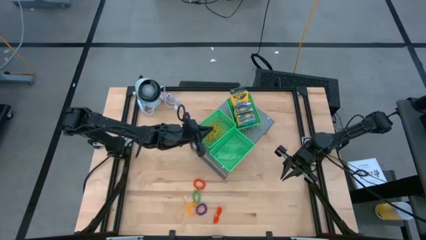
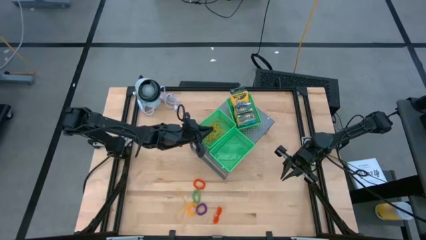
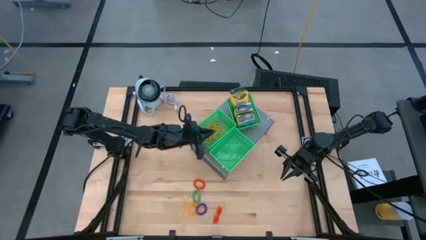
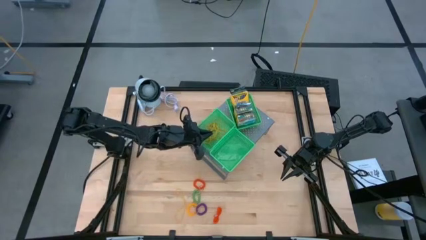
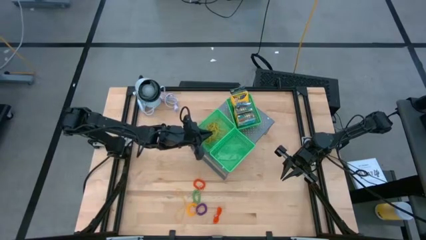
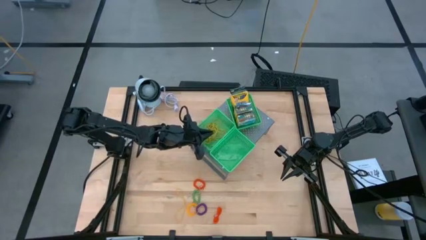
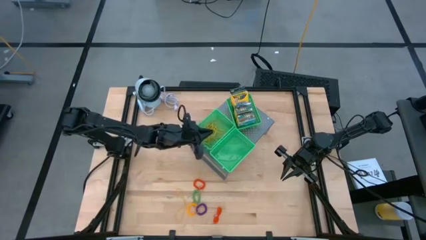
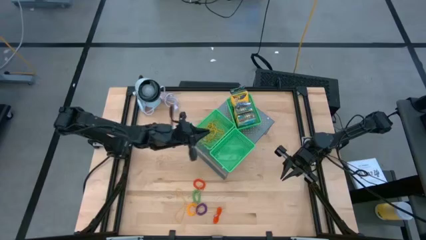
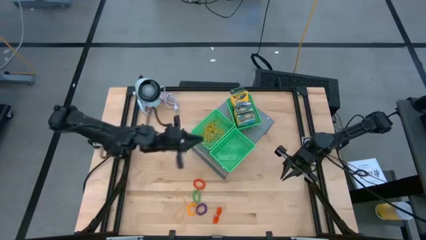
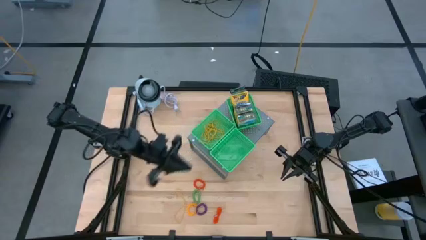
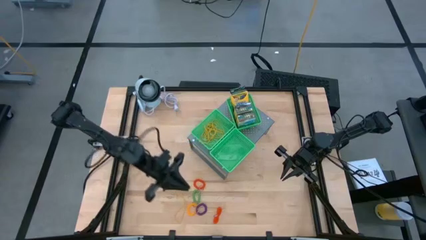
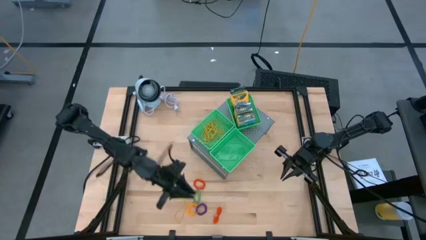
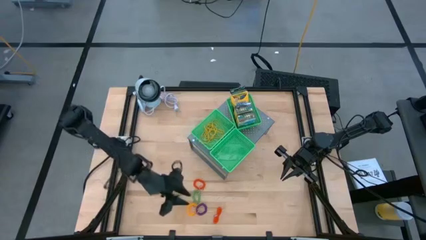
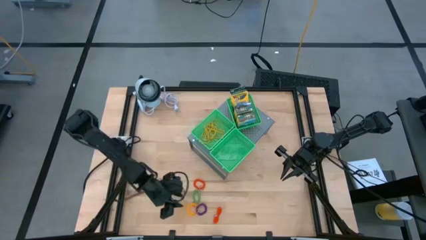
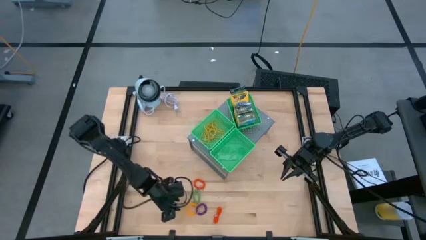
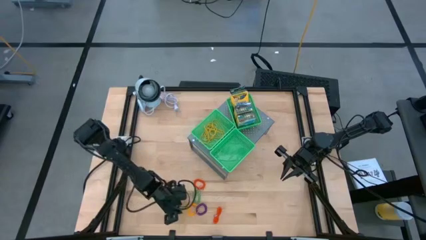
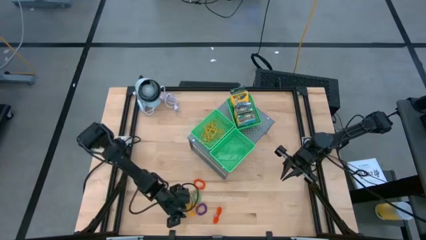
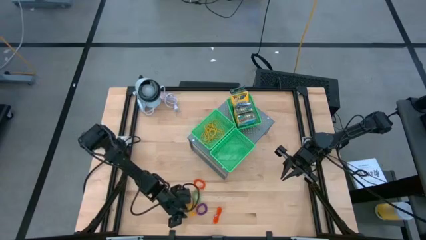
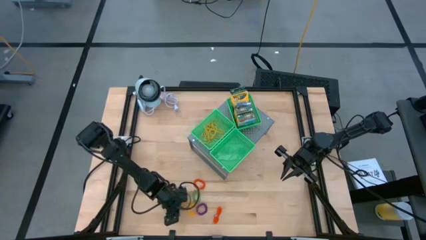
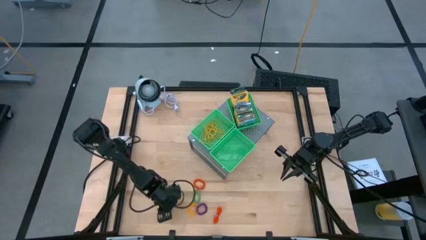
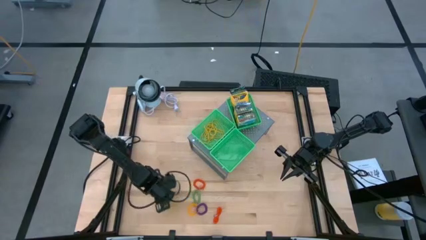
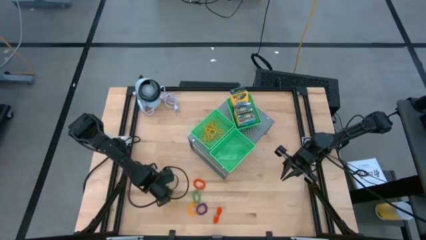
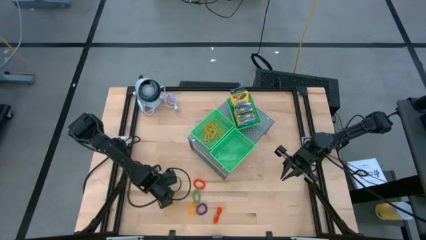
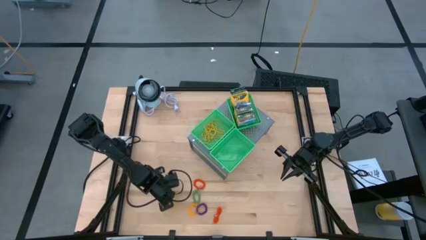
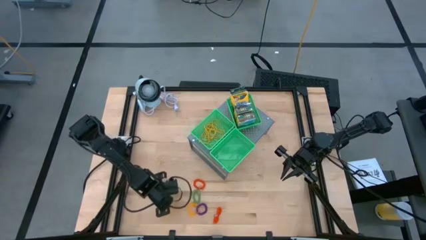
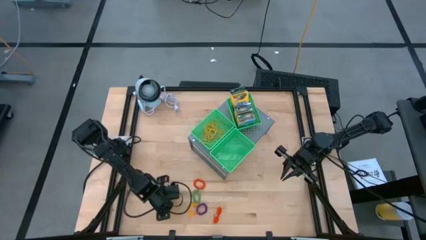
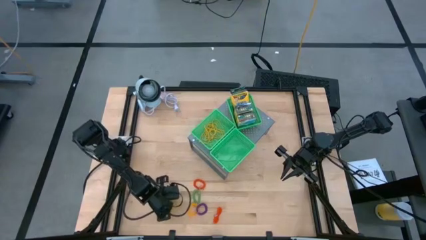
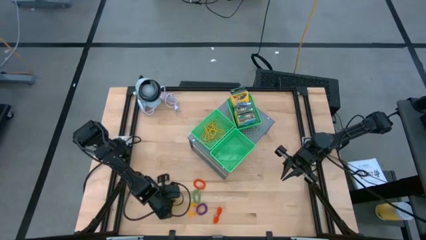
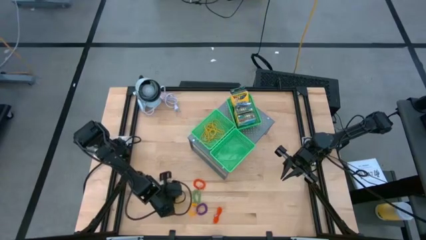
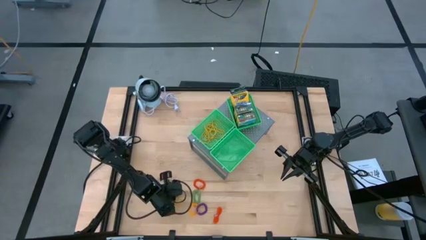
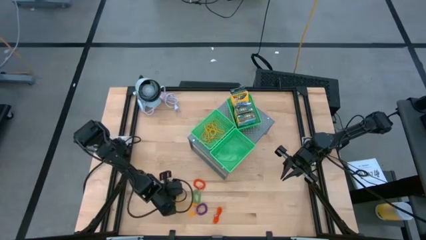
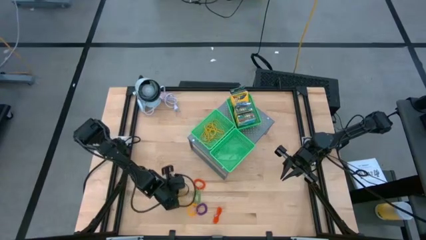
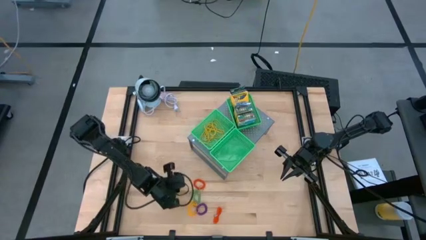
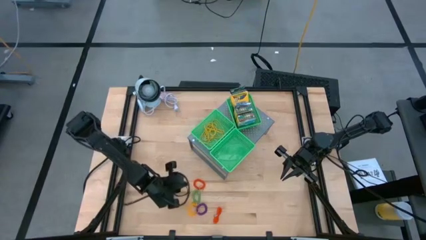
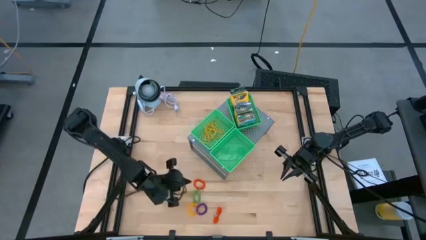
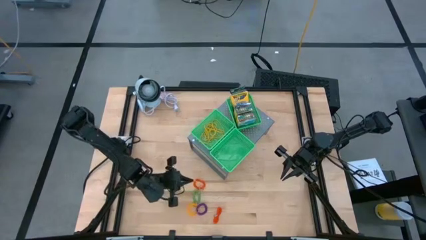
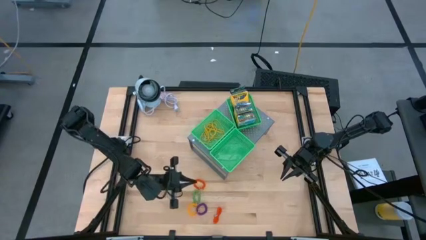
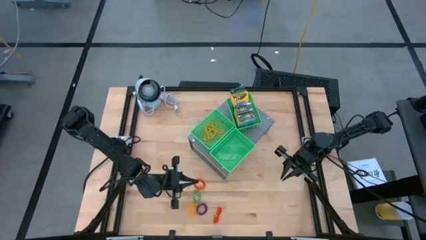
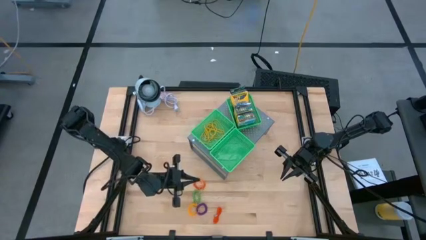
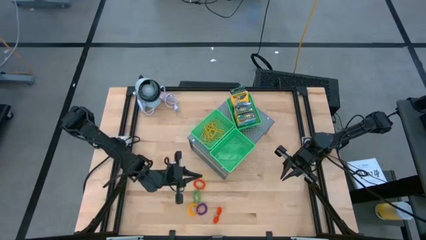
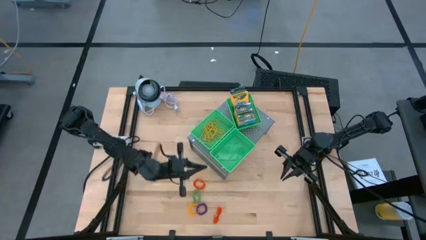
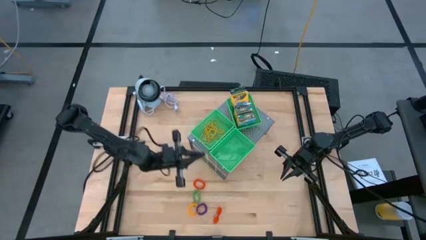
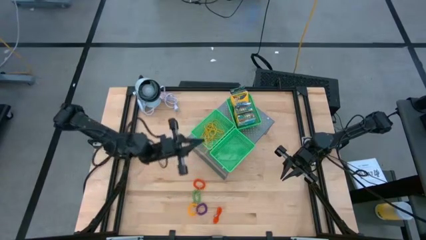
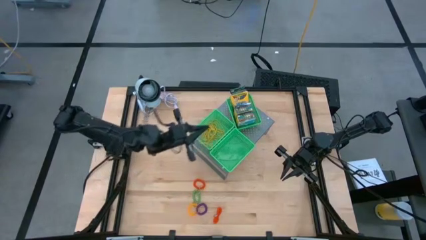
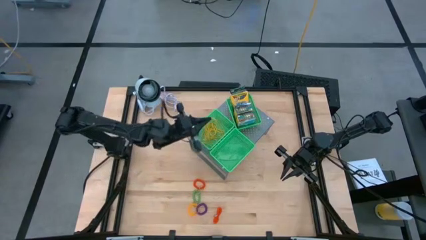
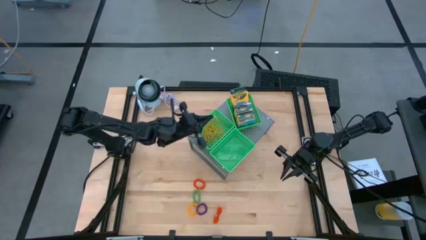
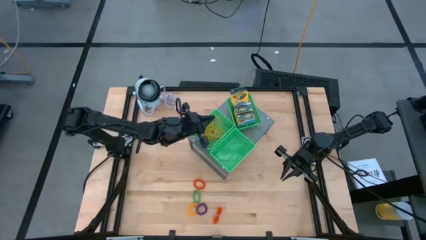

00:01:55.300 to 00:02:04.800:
Task: Pick & Place Office Desk Supplies
Put the yellow rubber band into the top left green bin on the shelf

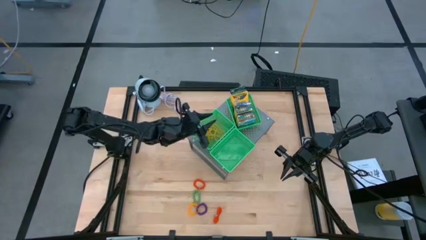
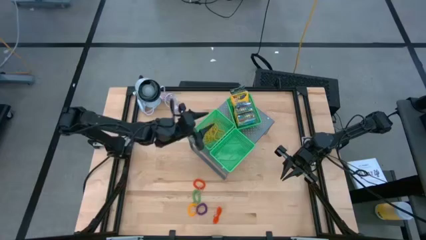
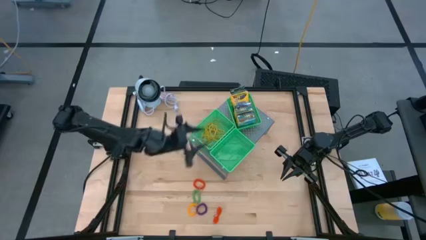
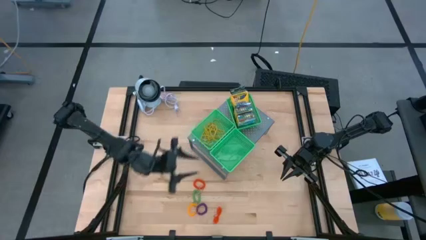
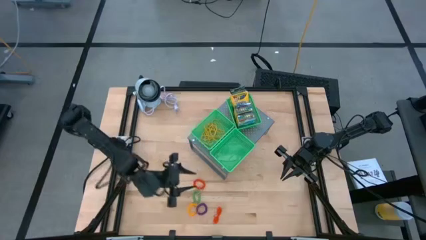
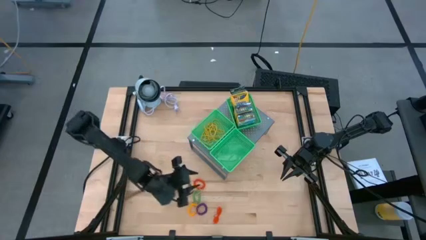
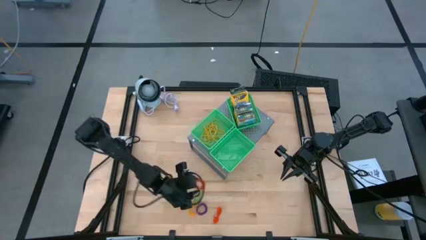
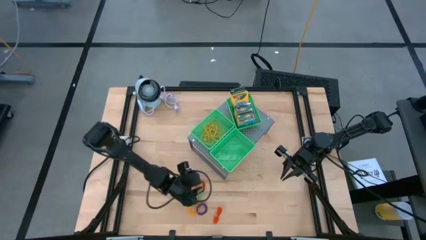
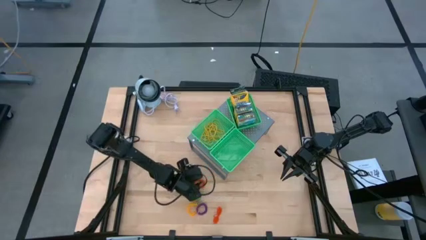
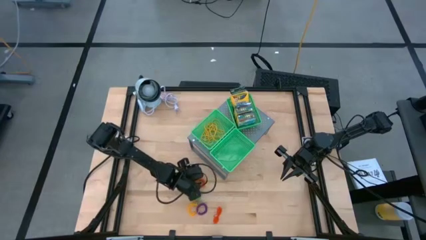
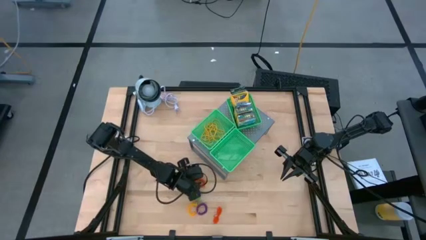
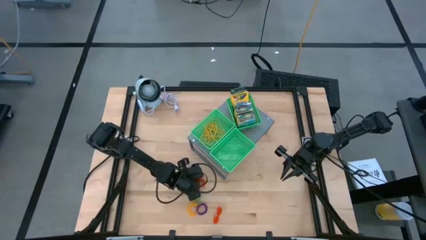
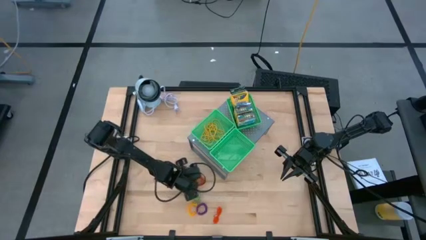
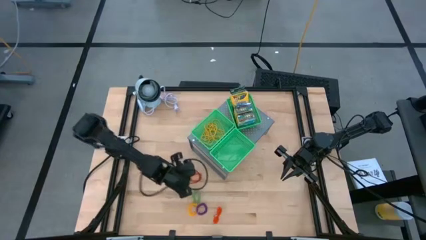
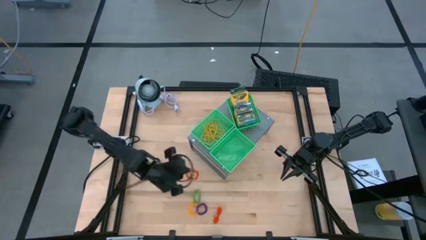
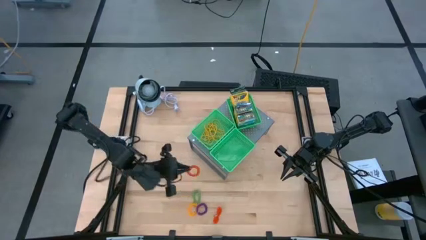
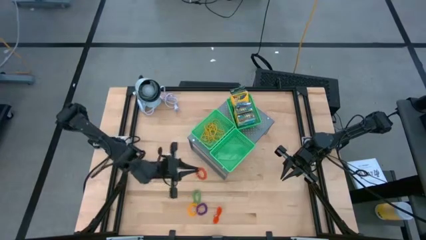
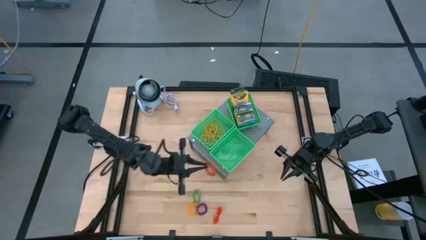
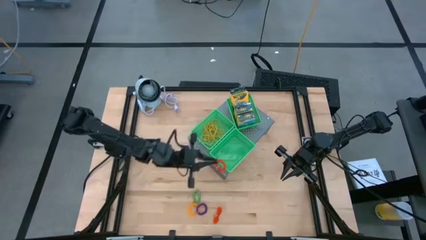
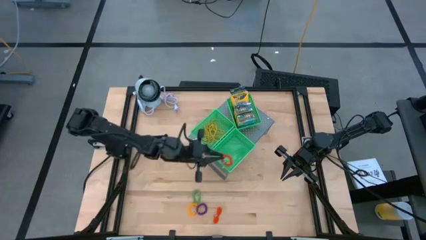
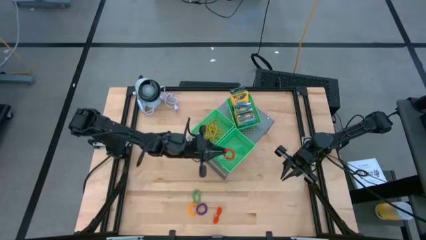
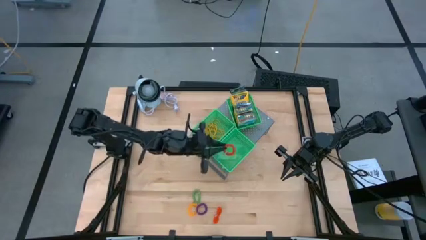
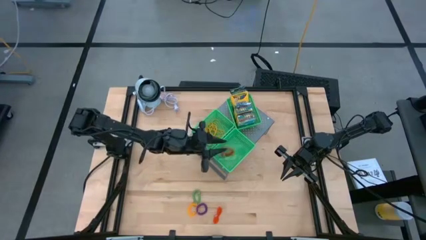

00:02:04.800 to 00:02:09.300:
Put the orange spring keychain into the bottom green bin on the shelf

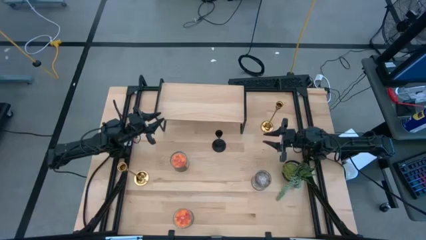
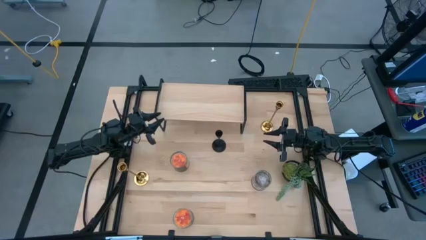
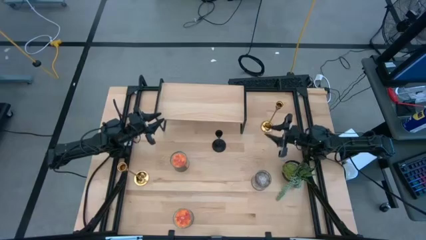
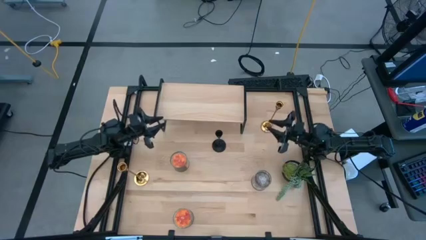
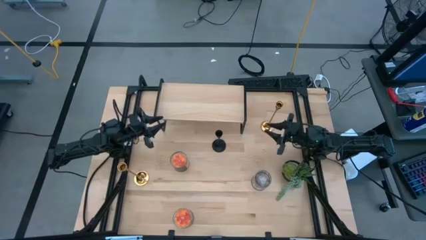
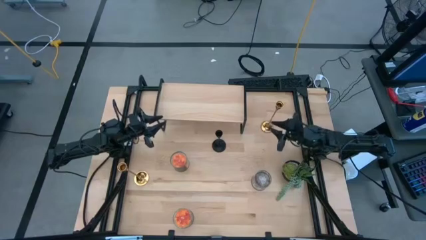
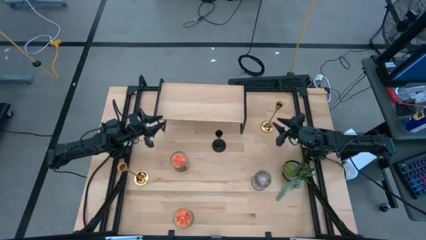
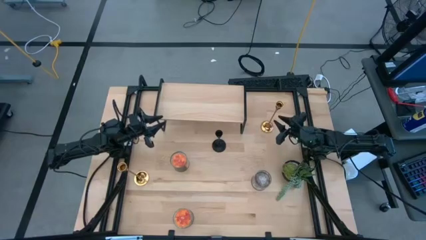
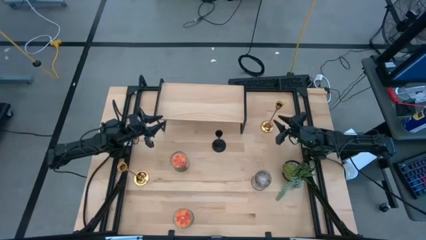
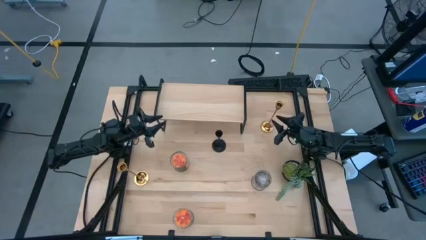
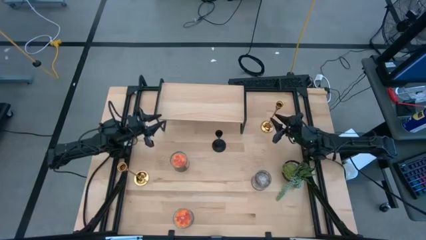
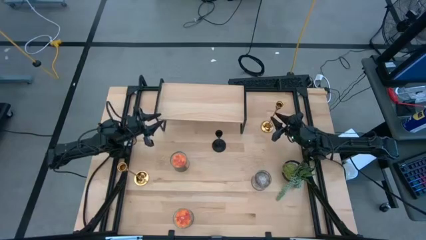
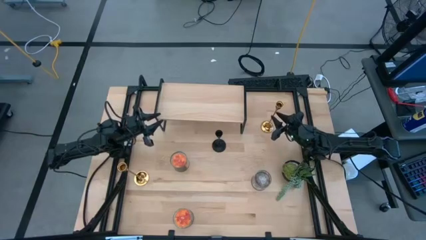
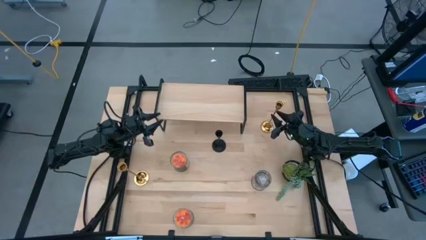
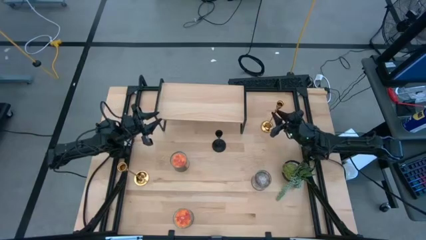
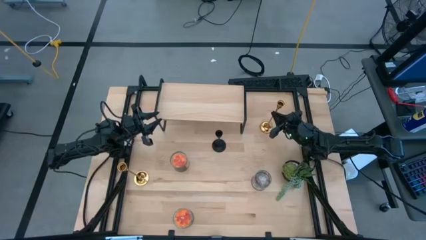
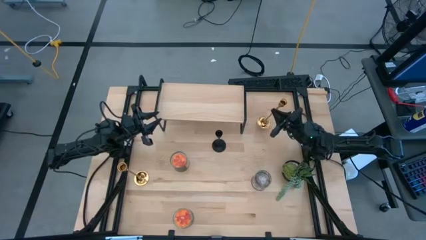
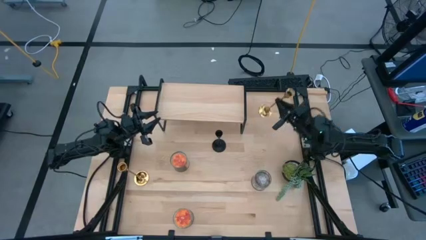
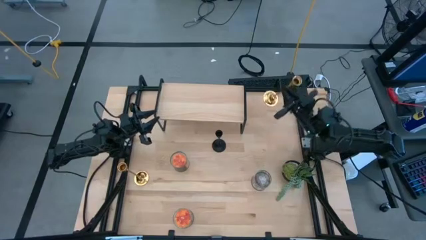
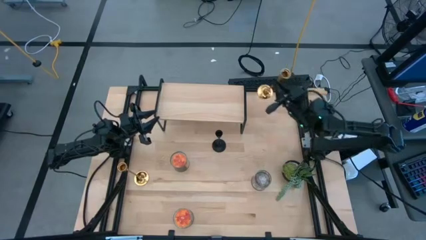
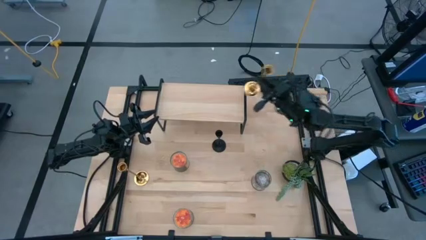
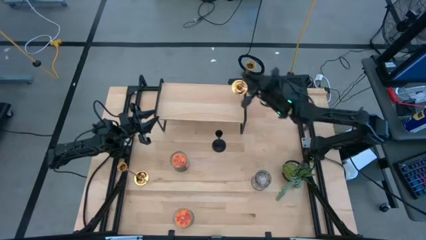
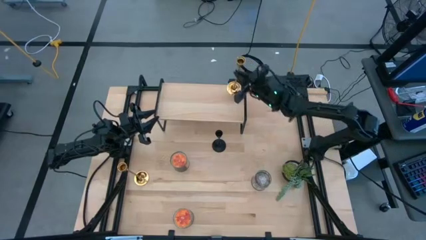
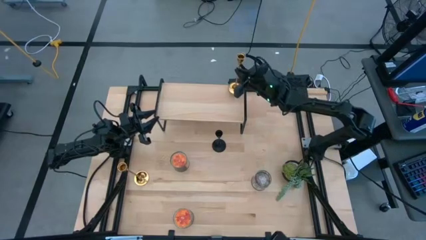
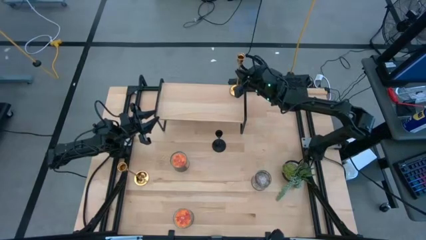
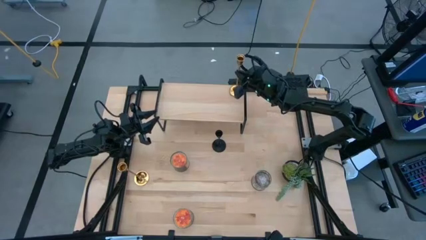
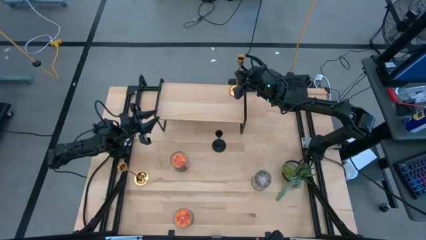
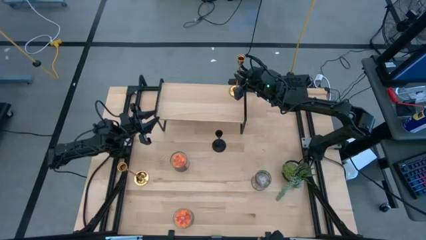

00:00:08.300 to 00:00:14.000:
Task: Pick & Place candle stick holders
Put the top golden candle holder on the shelf
